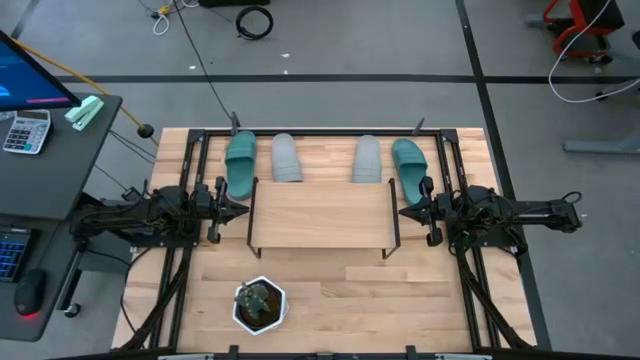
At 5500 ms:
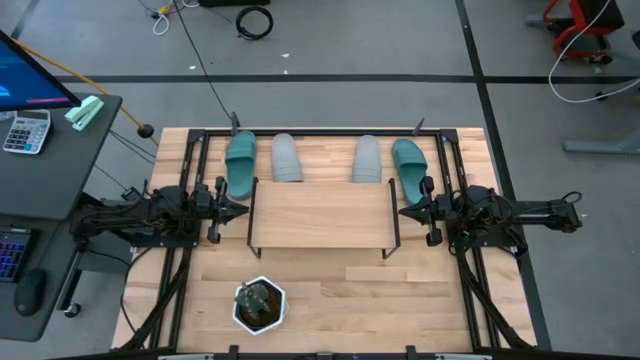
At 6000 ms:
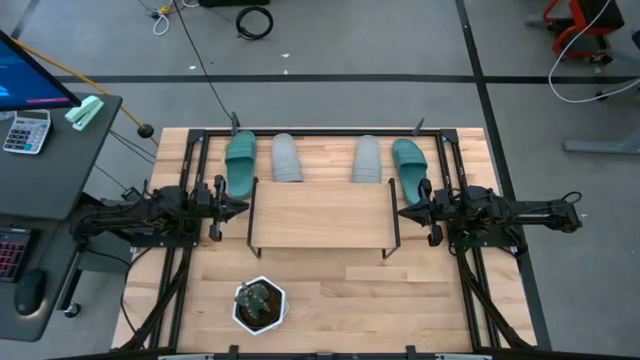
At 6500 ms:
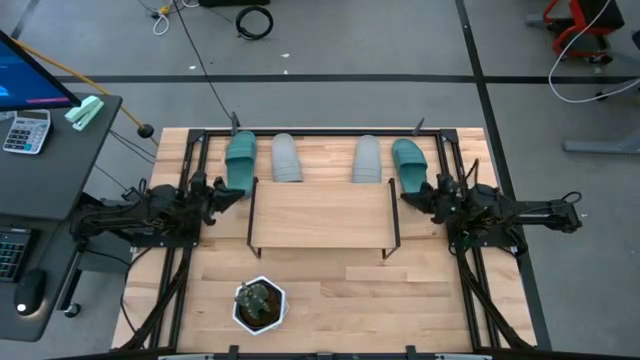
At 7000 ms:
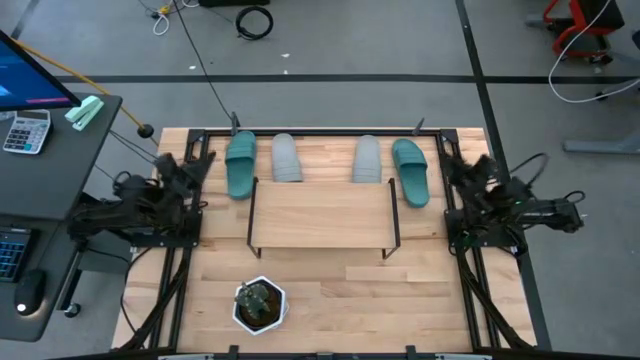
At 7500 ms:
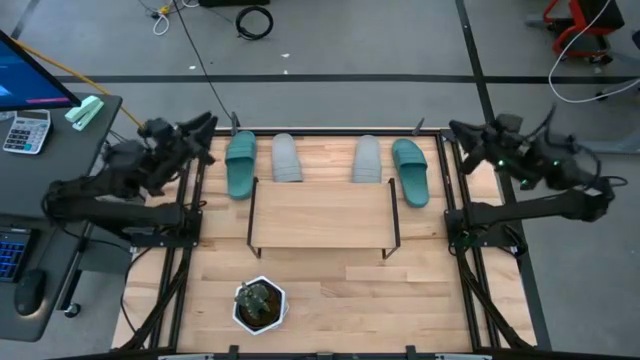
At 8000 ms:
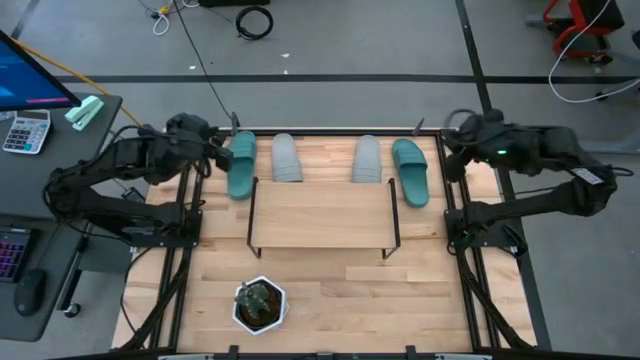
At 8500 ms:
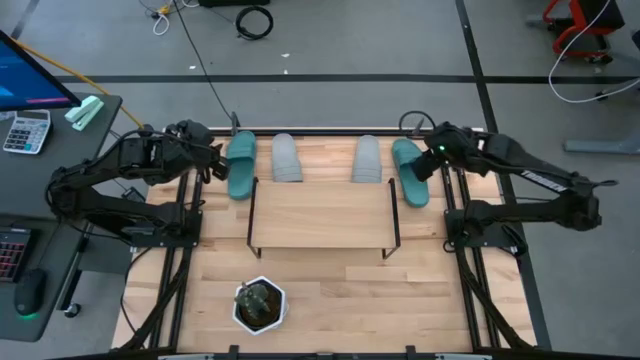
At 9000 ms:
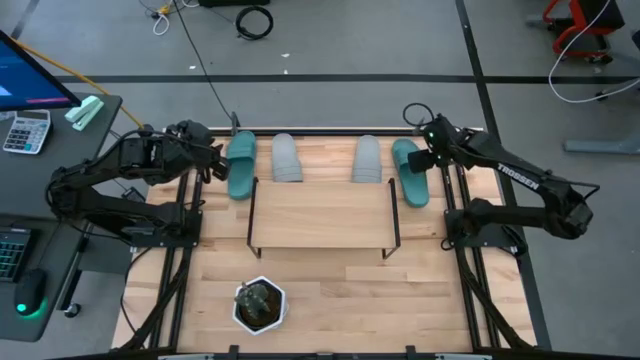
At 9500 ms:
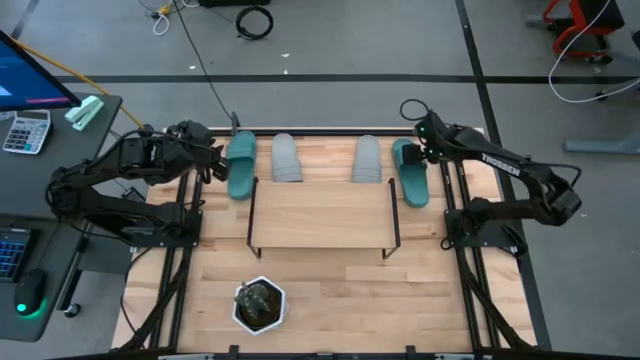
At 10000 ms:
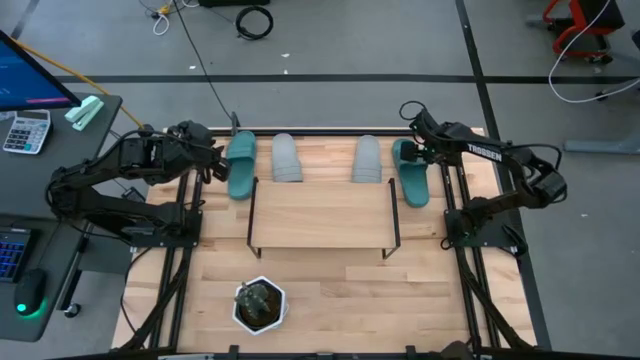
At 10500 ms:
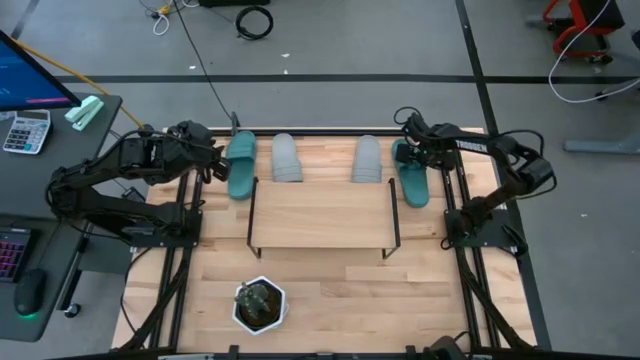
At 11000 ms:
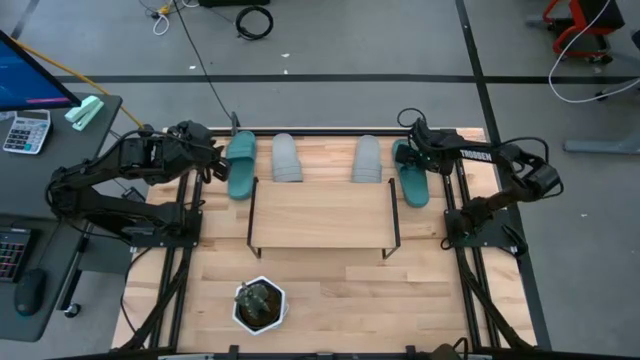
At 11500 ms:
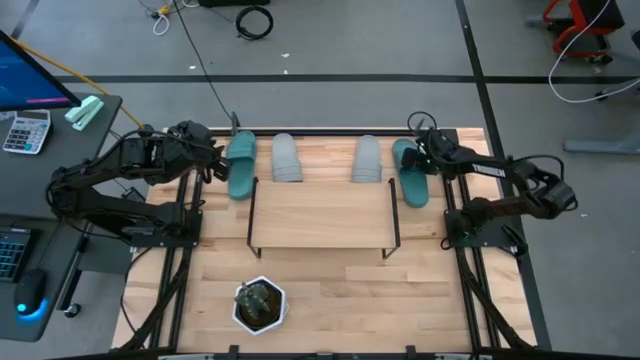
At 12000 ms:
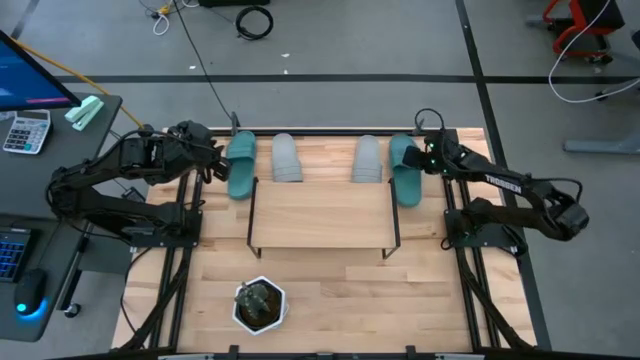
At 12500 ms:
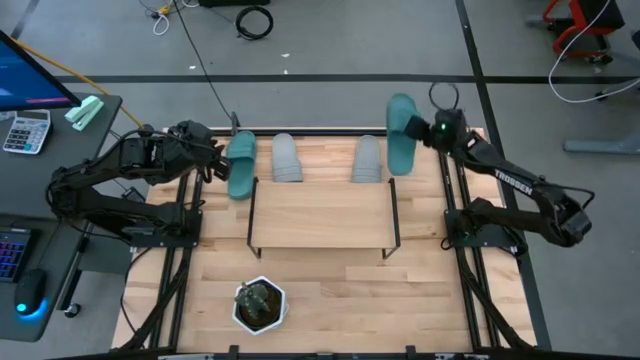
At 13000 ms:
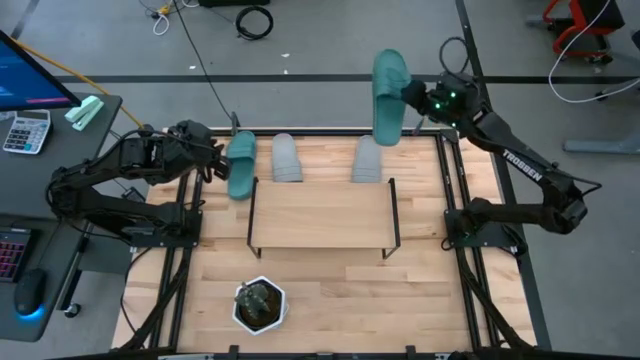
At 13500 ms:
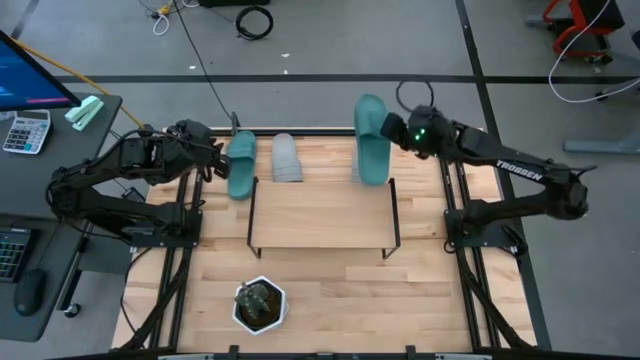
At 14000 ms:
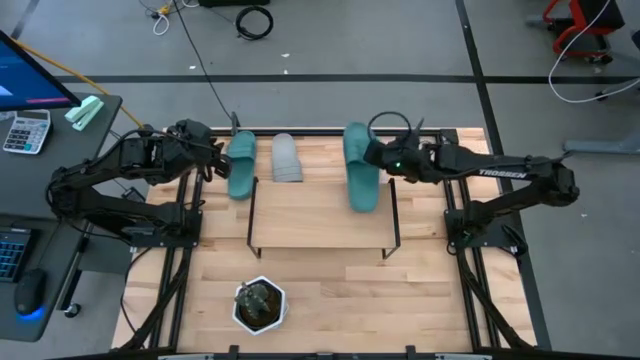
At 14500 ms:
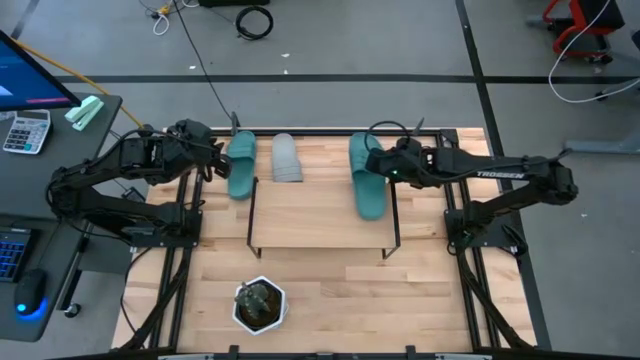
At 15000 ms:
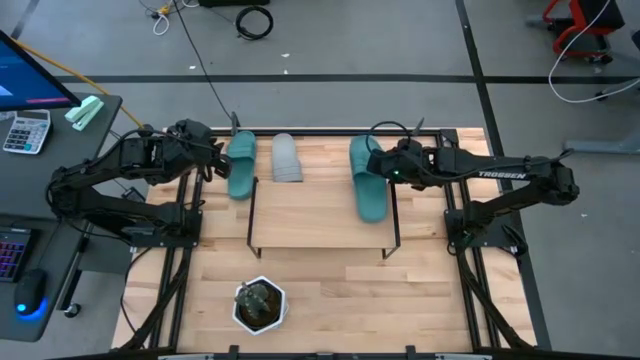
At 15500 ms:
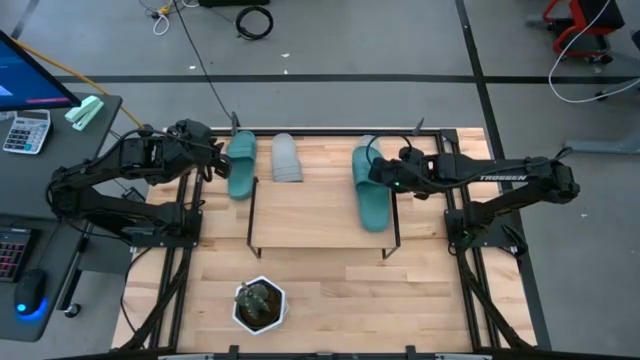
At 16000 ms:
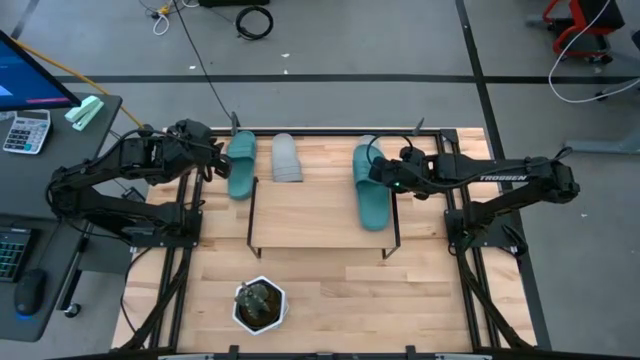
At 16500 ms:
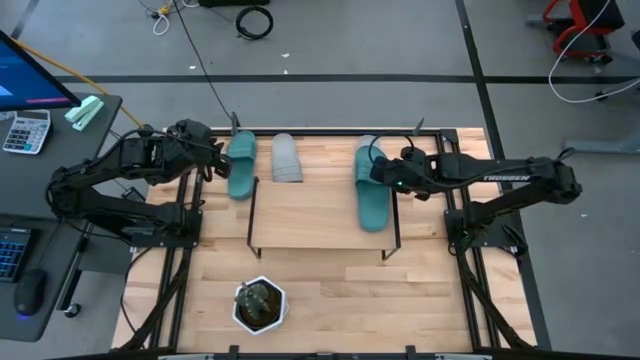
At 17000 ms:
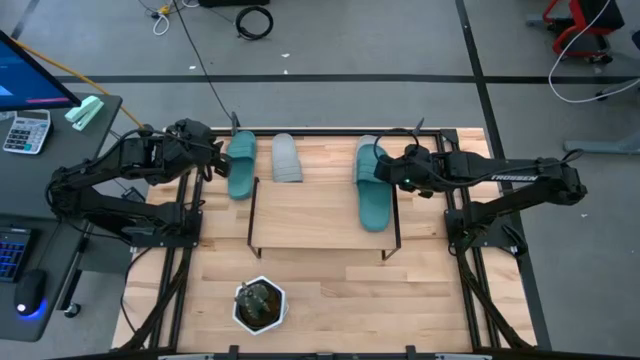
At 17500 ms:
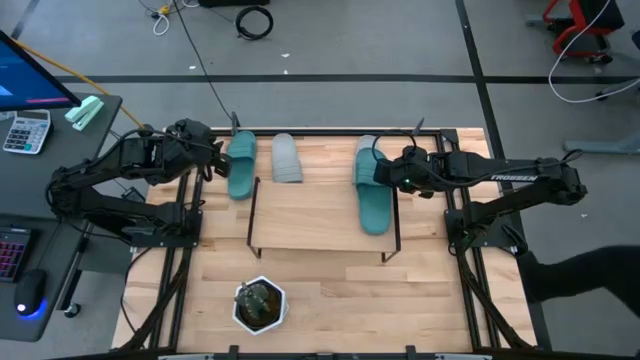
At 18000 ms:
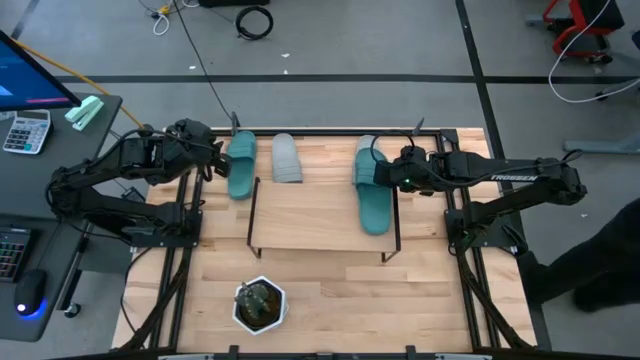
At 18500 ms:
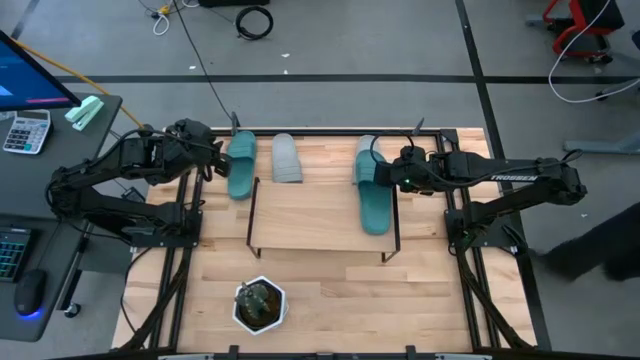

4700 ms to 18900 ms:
Task: Pick and place slides into the shelf
Put the right green slide on the shelf

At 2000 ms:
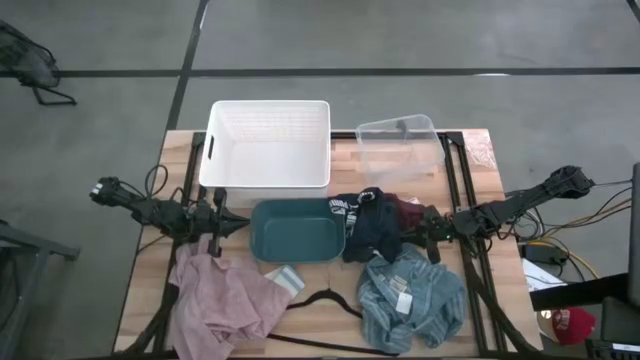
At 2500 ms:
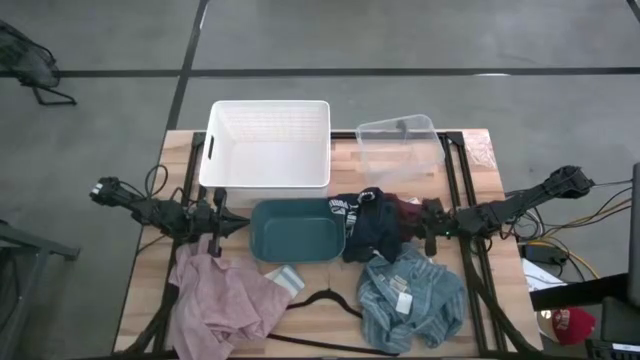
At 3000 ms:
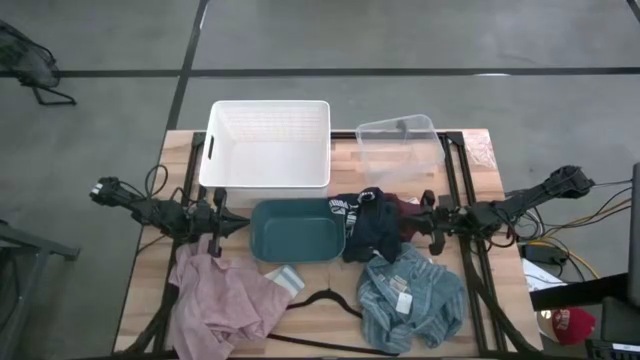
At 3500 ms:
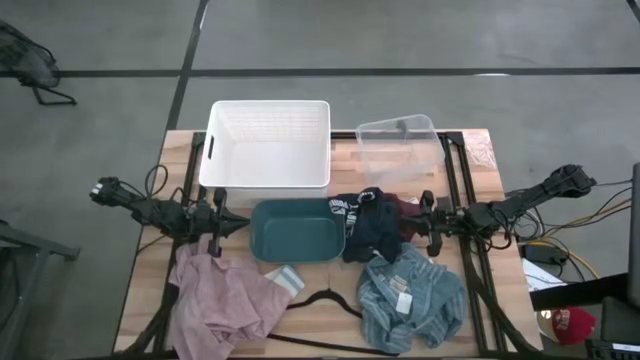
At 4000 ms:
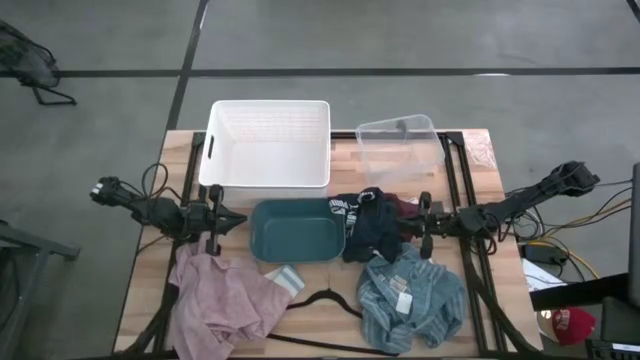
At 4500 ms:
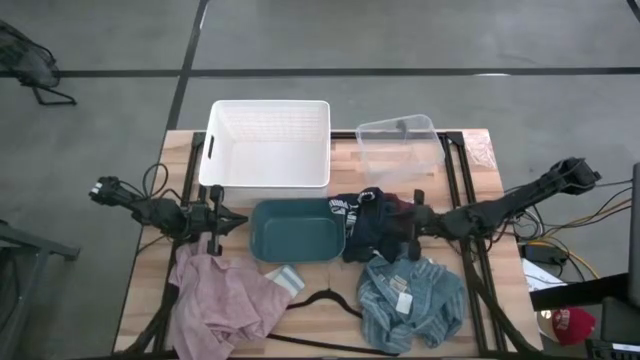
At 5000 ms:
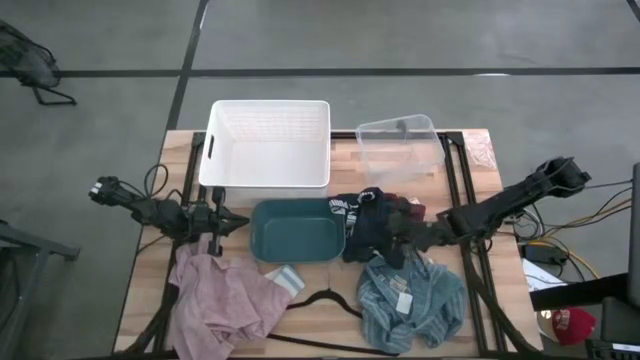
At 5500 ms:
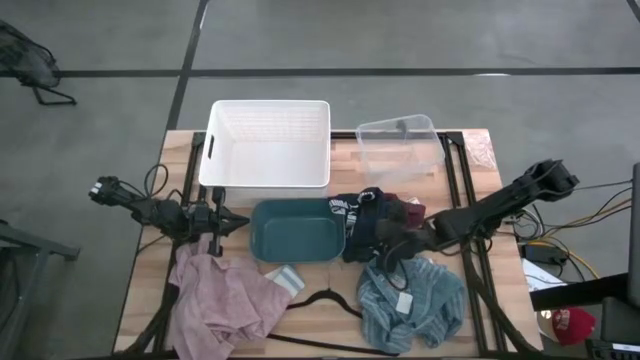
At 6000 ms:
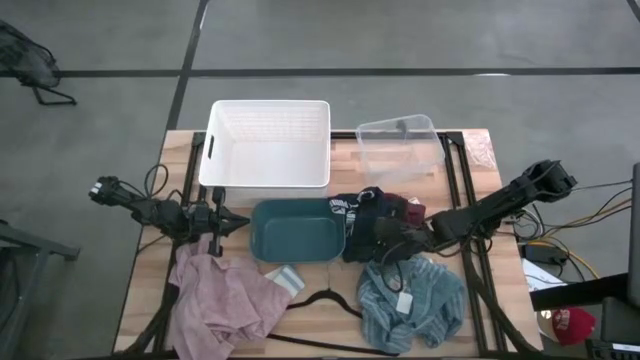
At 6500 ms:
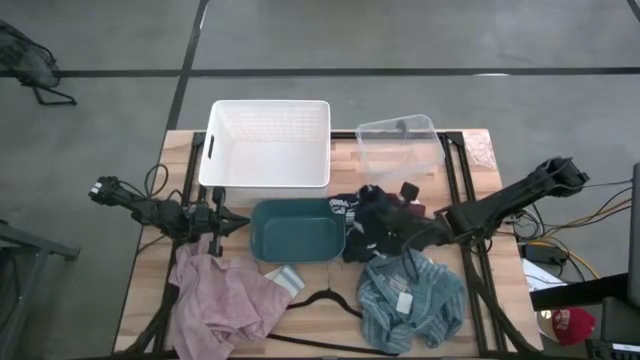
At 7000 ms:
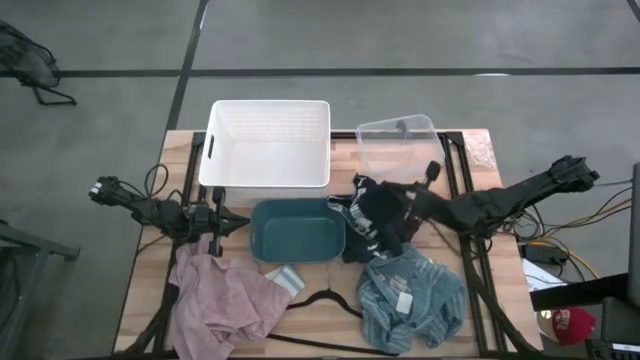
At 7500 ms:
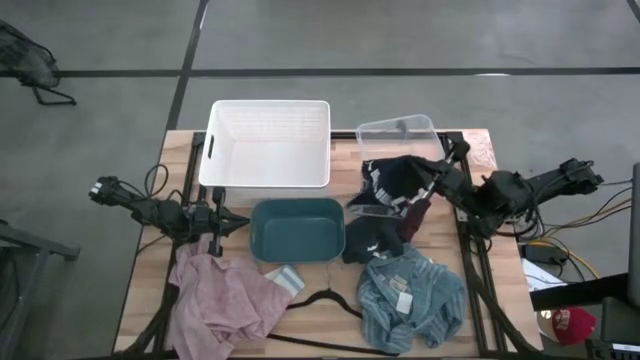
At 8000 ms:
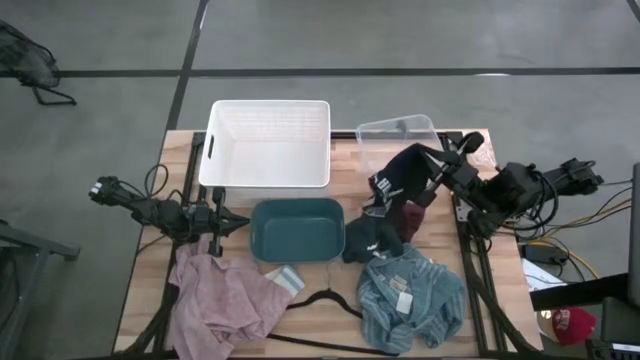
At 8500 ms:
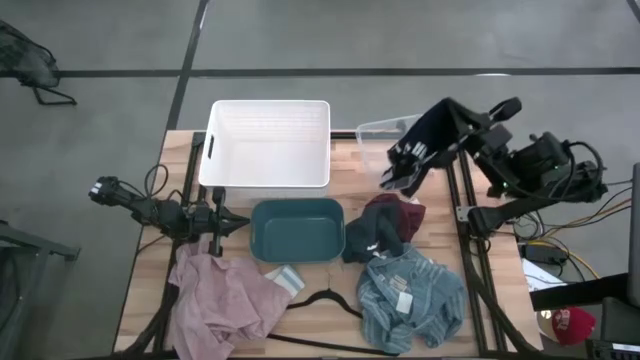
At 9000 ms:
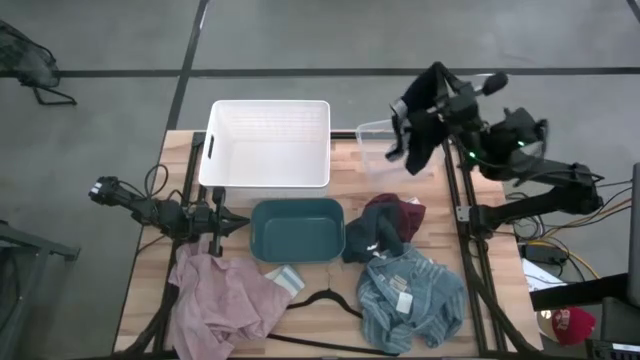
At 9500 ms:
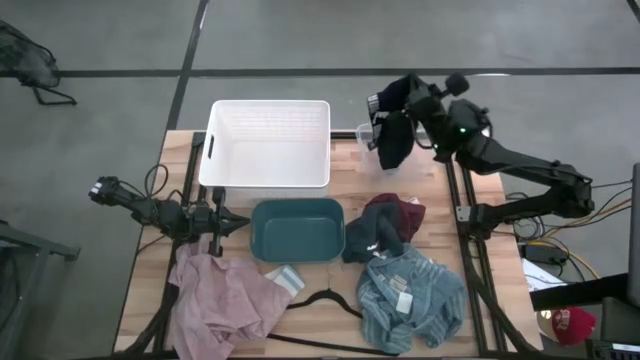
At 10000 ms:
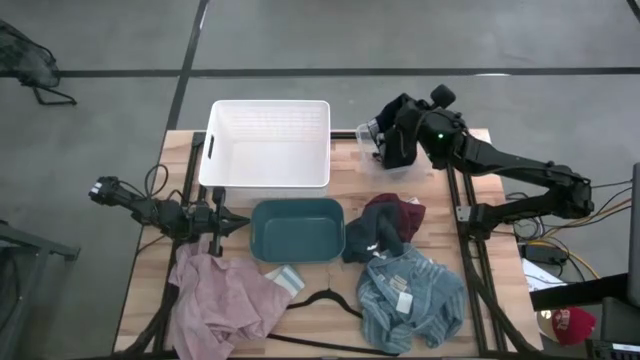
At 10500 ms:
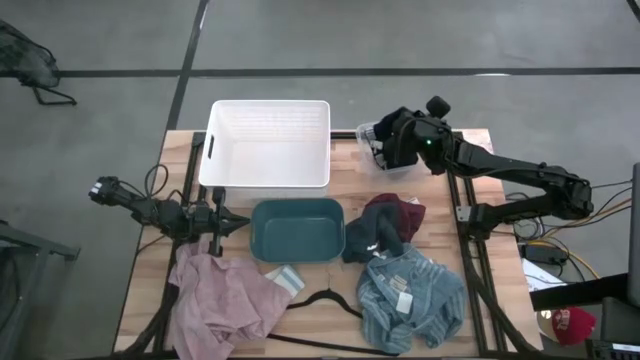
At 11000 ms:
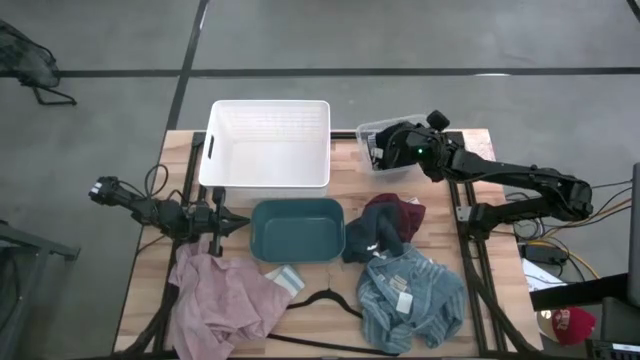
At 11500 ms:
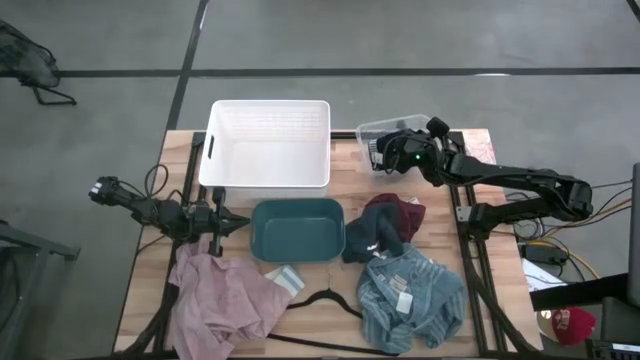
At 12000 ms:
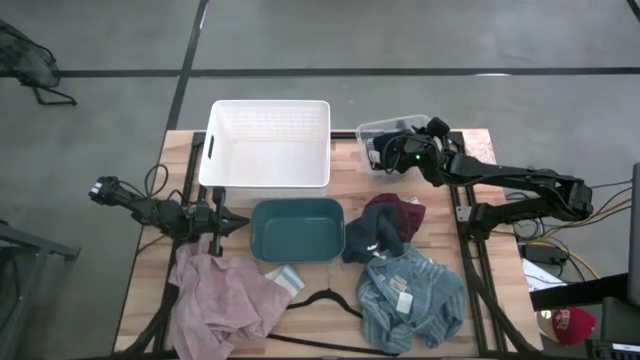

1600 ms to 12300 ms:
Task: Pick & Place Cloths
Put the blue boxers into the transparent bin
